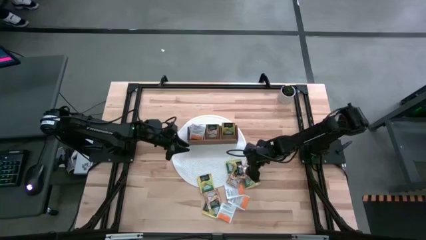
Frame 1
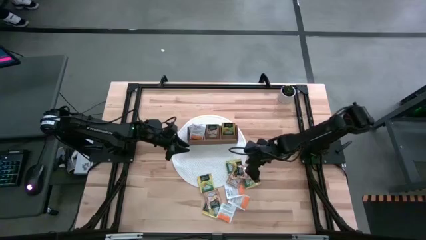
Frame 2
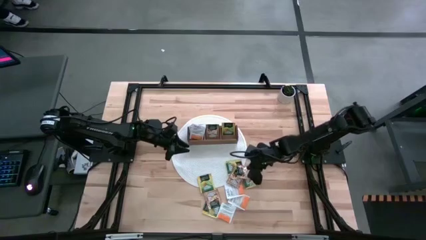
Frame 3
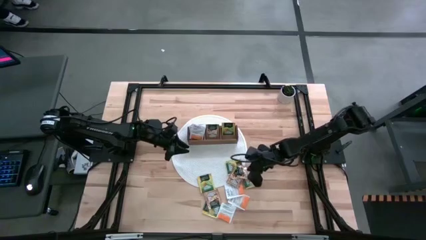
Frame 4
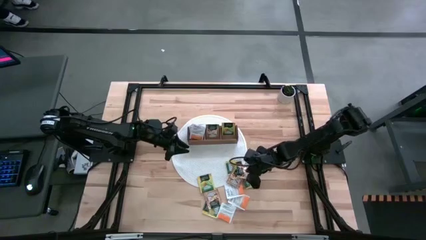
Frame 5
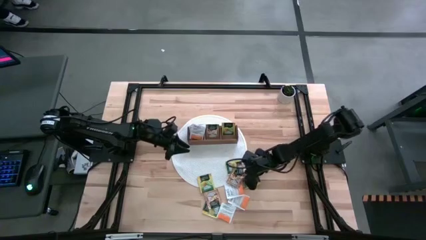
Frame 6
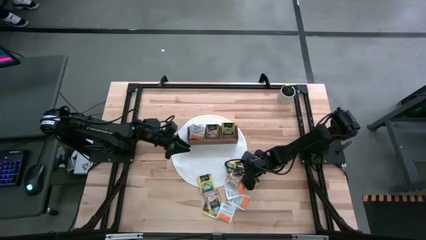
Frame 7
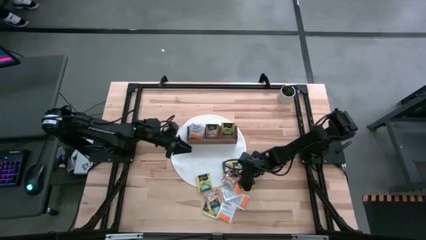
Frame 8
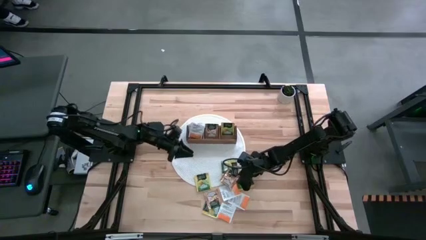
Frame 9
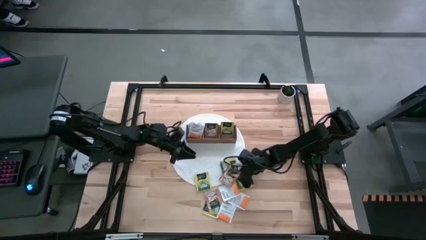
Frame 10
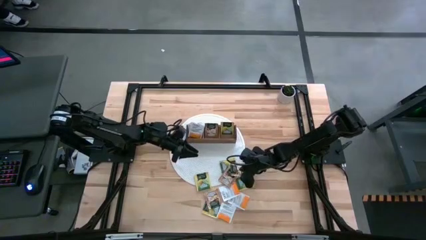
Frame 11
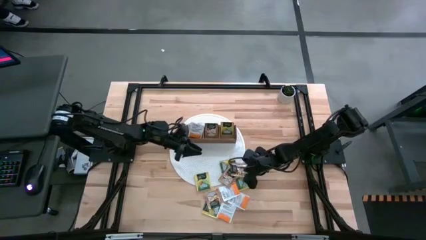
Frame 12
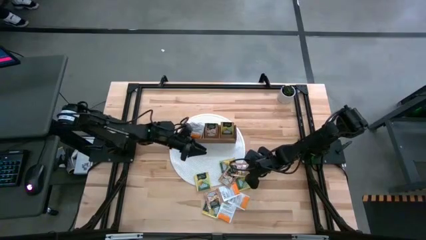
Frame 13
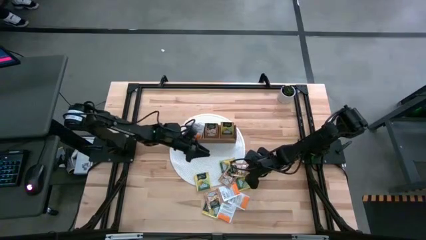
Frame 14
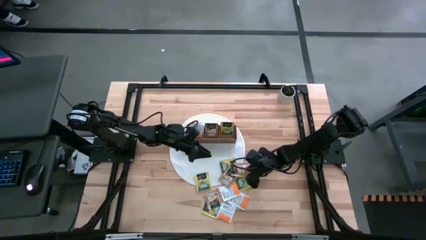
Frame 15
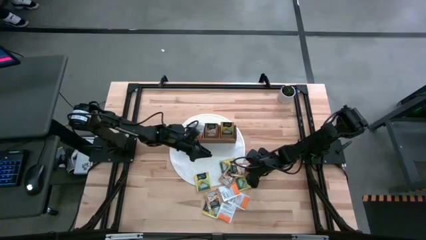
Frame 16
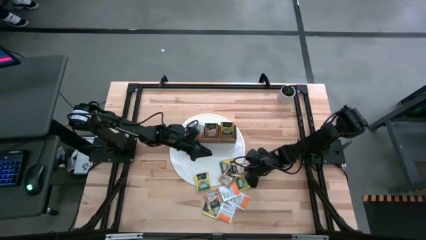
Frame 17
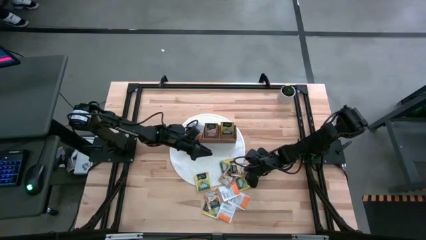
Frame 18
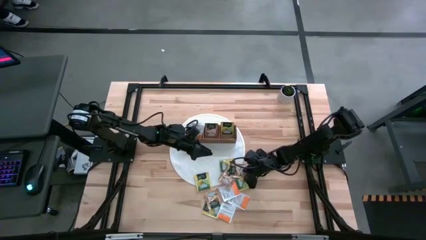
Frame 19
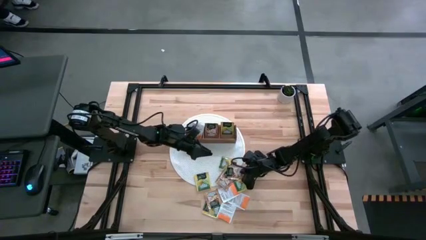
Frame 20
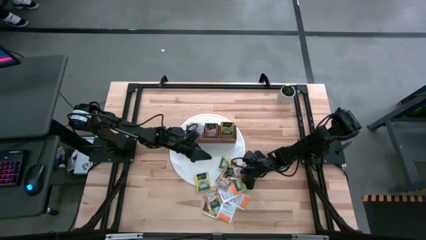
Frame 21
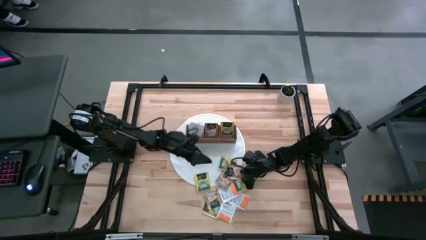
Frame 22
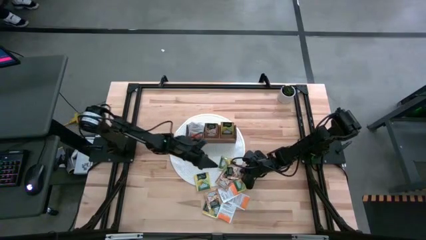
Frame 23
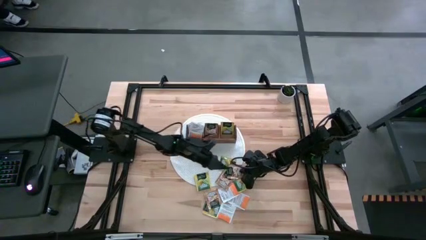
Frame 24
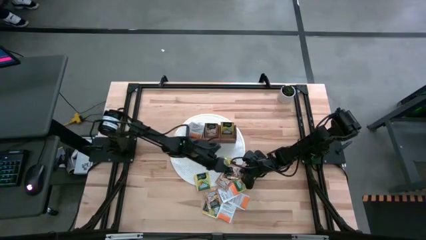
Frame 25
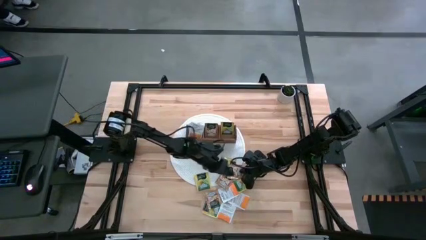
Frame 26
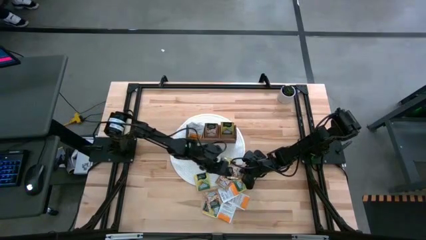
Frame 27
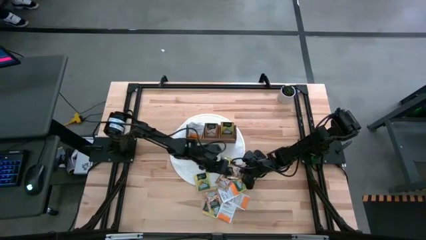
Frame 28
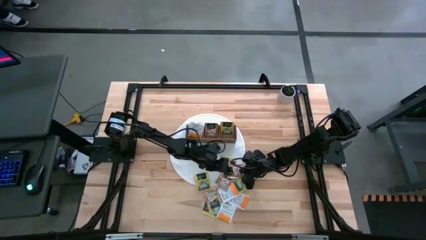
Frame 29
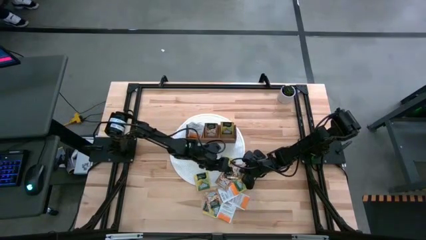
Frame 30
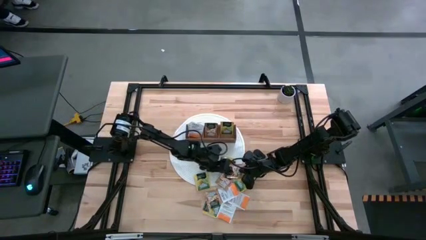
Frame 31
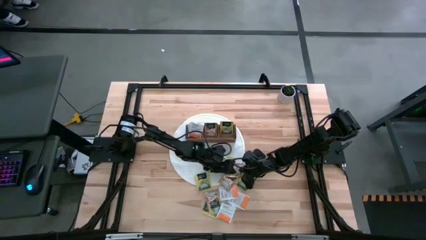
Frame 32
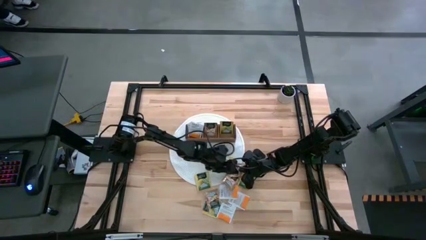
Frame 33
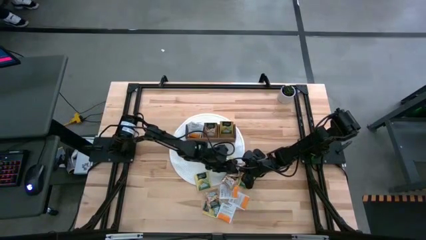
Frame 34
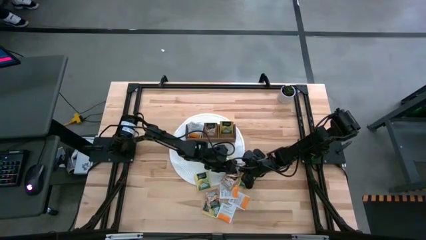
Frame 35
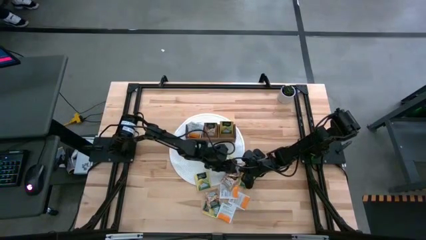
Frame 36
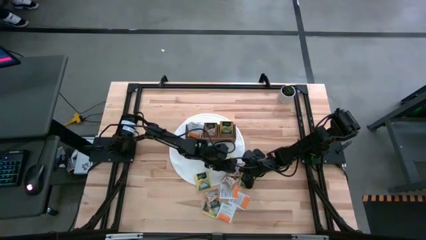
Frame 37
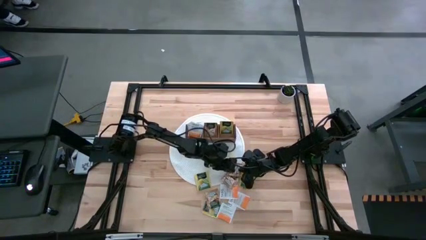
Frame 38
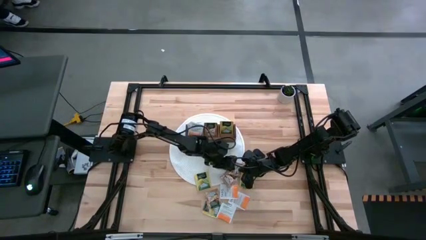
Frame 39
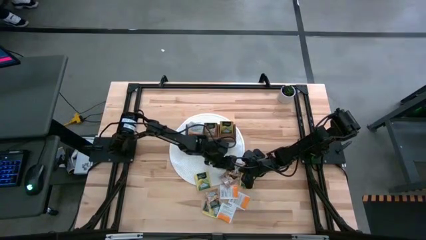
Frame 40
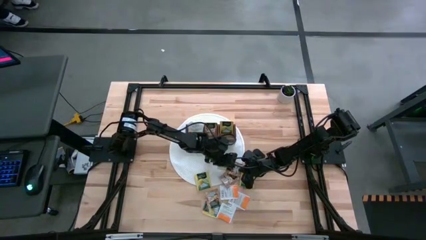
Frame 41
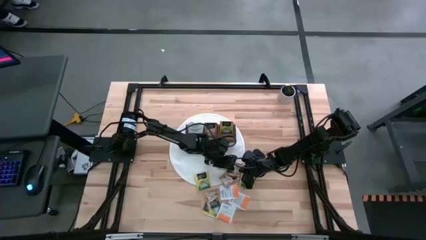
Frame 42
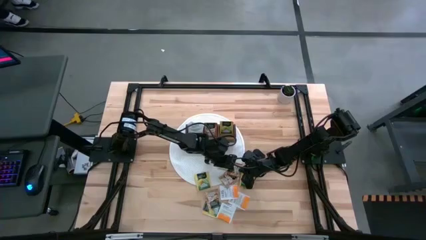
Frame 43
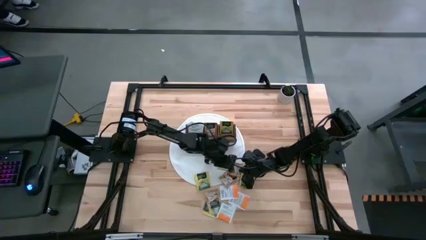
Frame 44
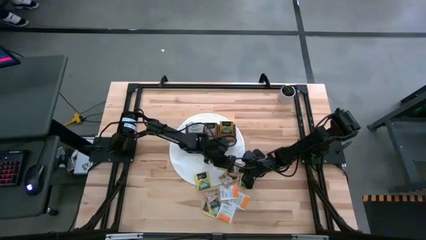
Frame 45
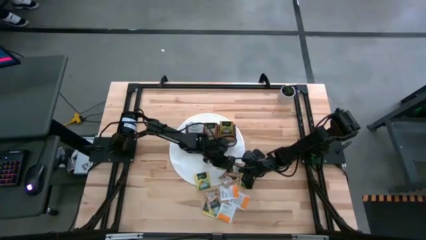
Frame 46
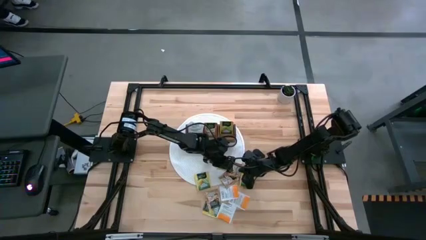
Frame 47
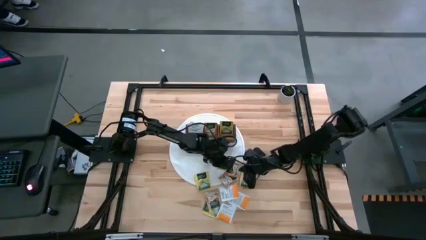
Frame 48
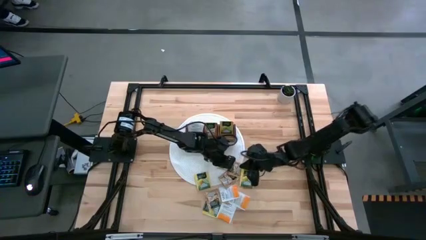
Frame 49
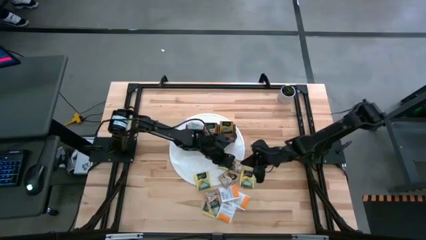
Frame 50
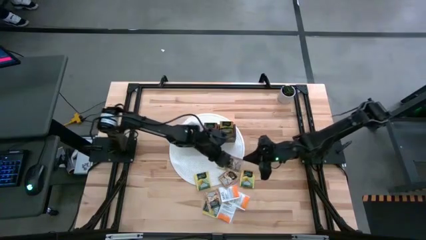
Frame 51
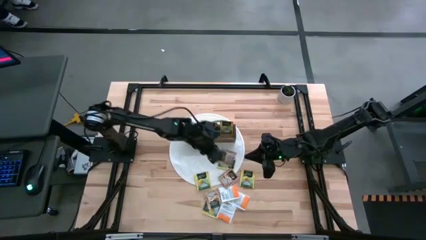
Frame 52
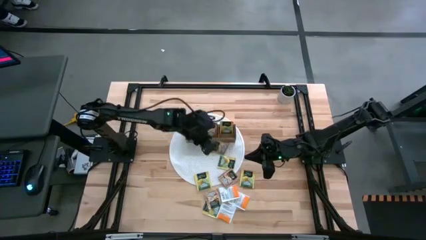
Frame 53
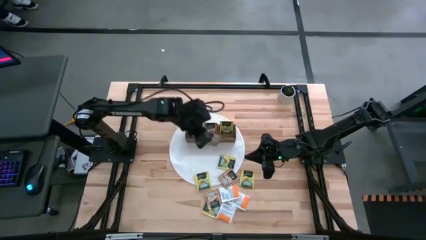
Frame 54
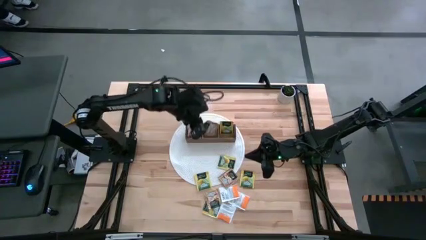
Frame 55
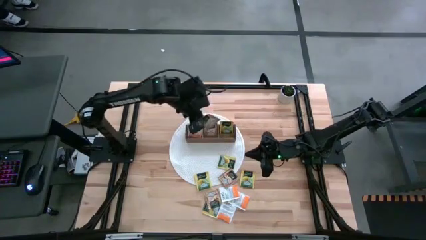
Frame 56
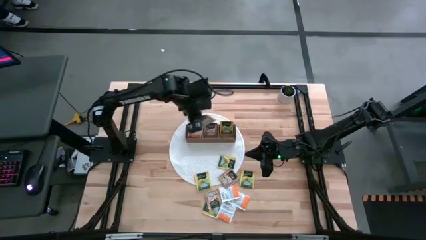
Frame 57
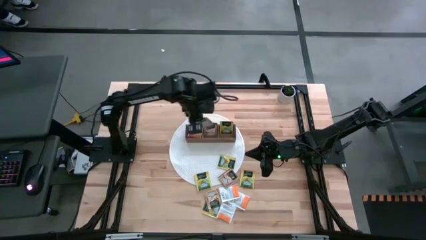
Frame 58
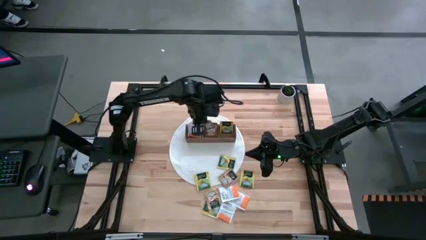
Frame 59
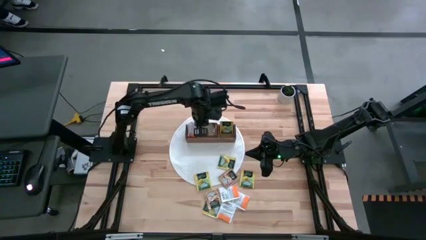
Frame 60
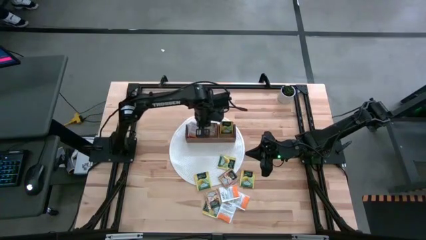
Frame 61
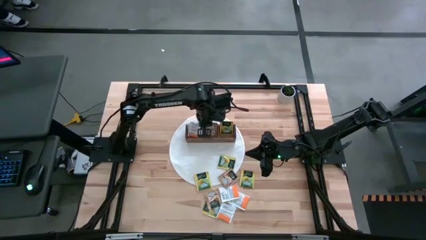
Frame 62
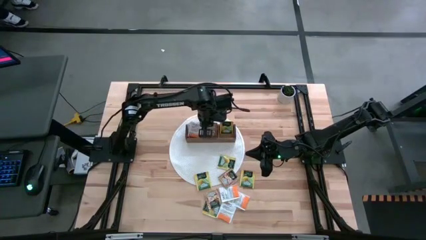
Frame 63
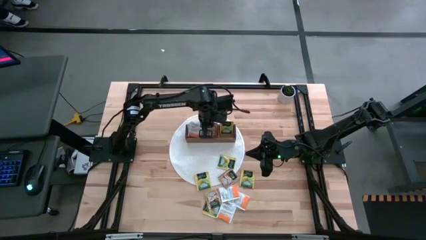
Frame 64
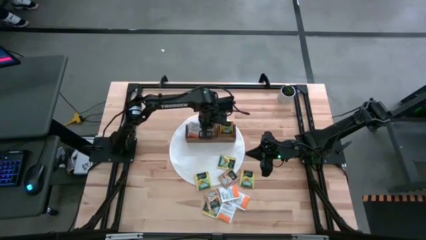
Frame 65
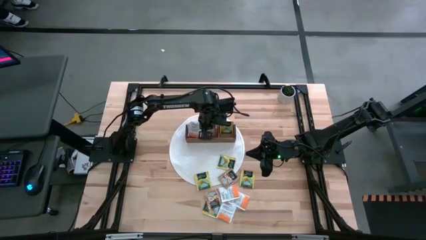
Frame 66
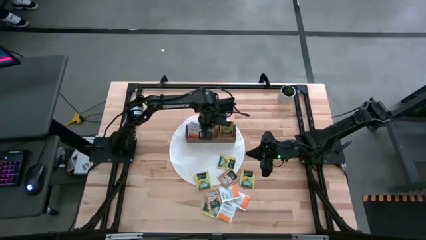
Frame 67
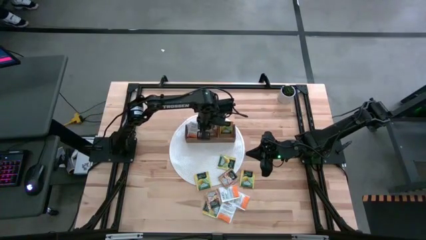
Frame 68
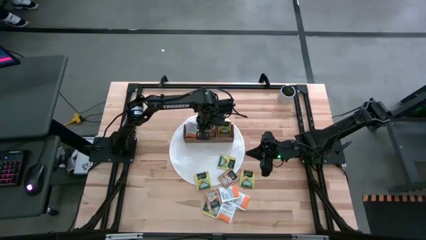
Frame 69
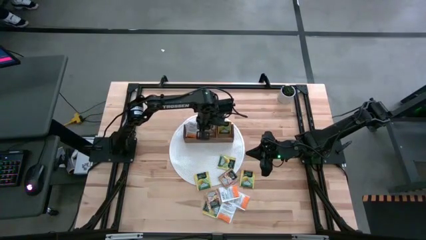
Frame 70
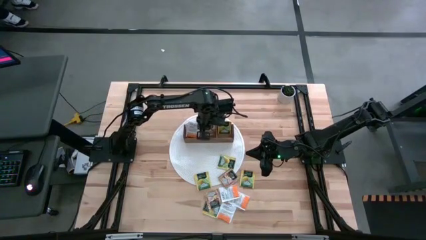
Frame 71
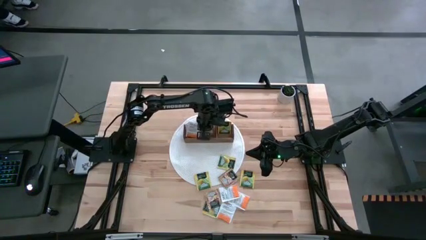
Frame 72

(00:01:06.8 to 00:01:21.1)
Task: Pick & Place Tea
Put the brown tea bag into the middle section of the wooden organizer
